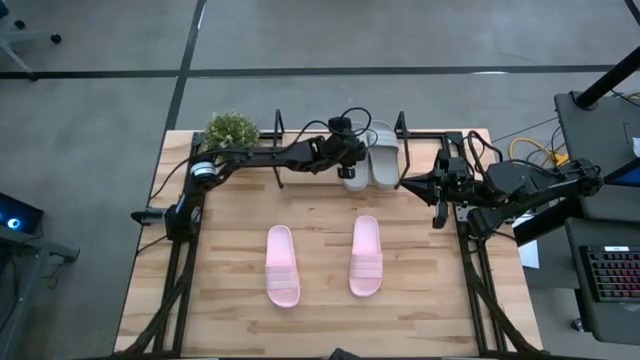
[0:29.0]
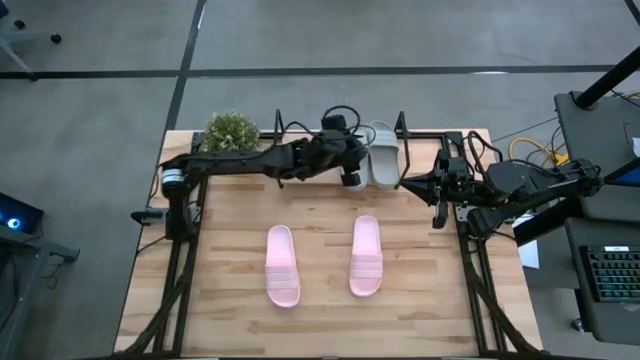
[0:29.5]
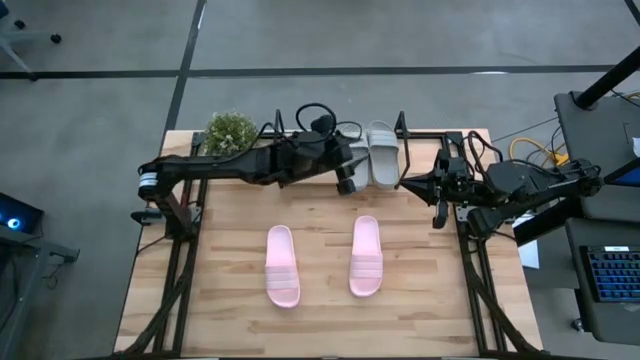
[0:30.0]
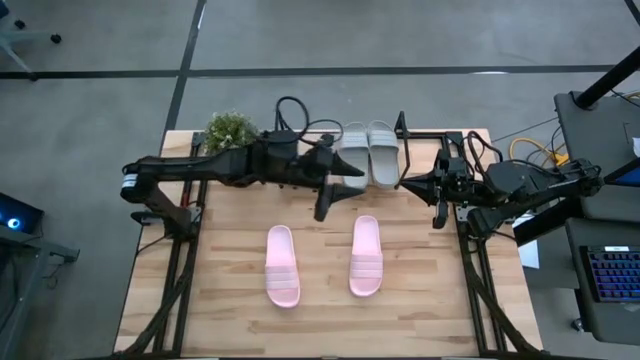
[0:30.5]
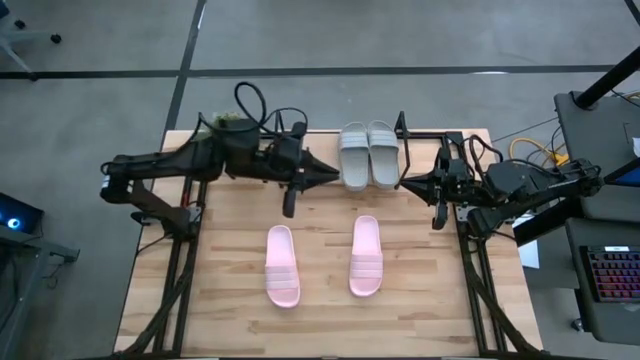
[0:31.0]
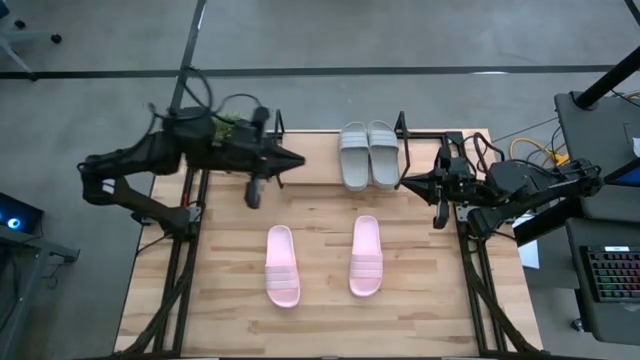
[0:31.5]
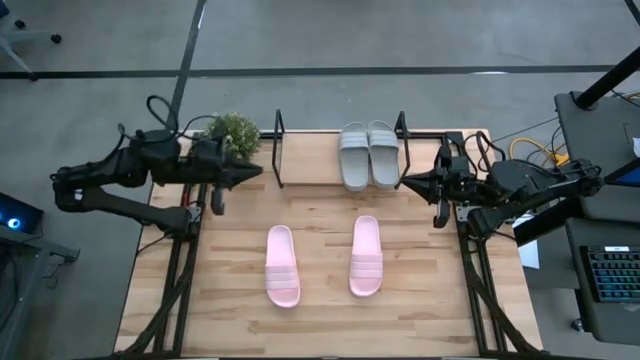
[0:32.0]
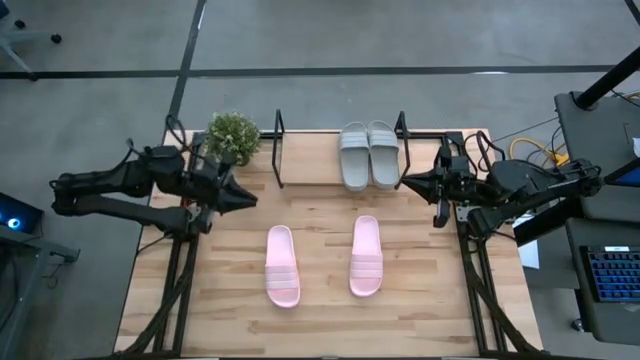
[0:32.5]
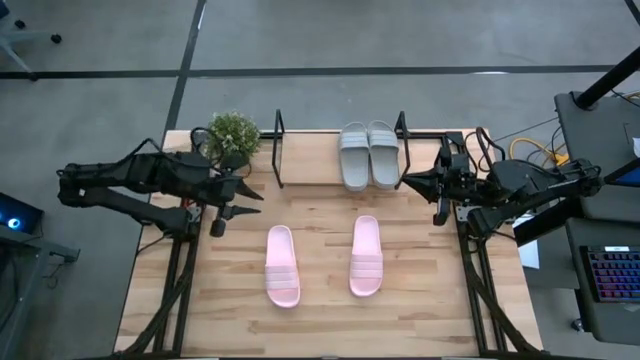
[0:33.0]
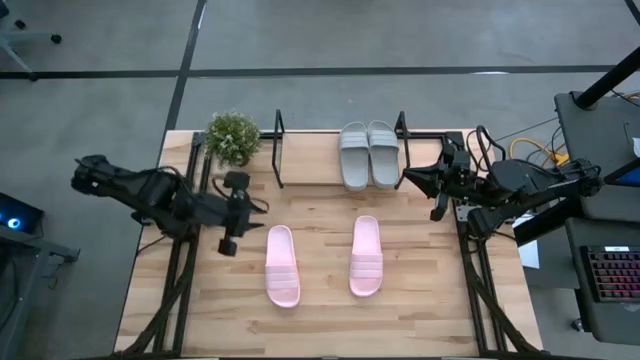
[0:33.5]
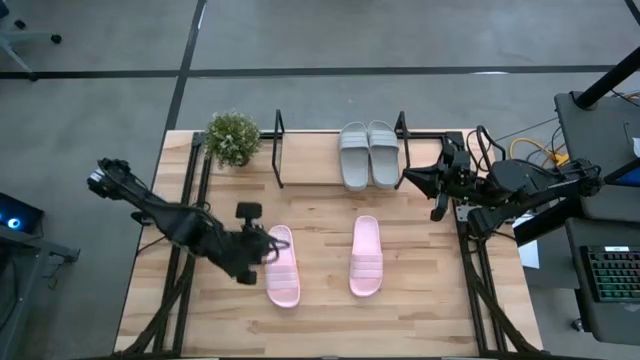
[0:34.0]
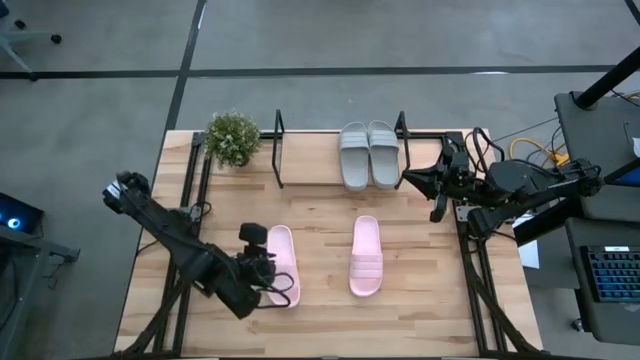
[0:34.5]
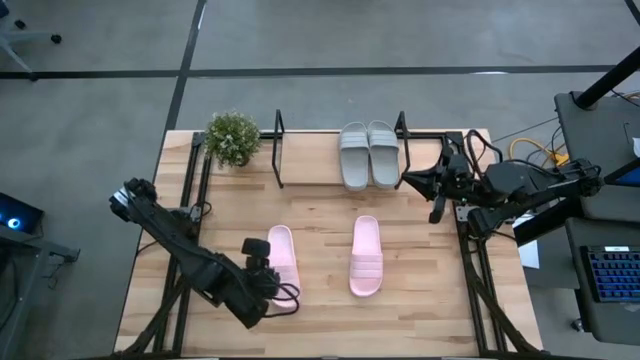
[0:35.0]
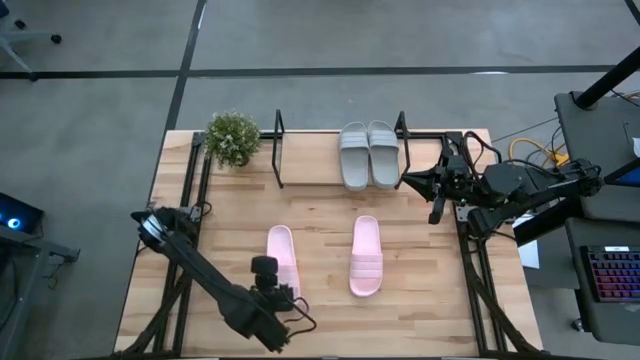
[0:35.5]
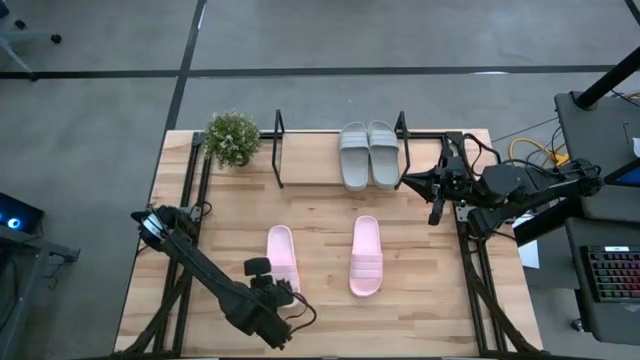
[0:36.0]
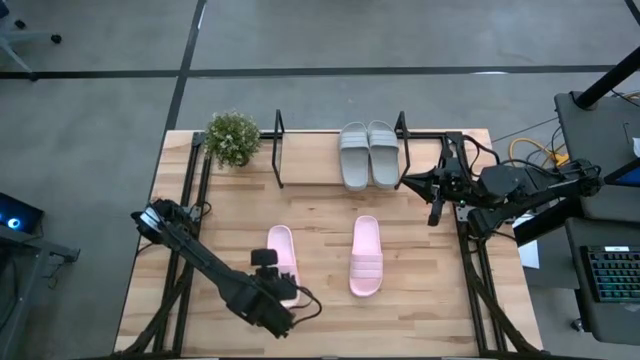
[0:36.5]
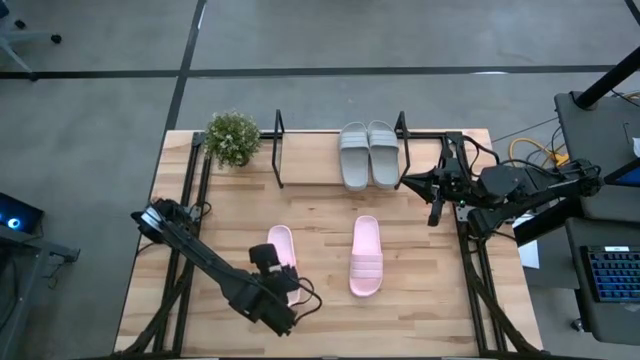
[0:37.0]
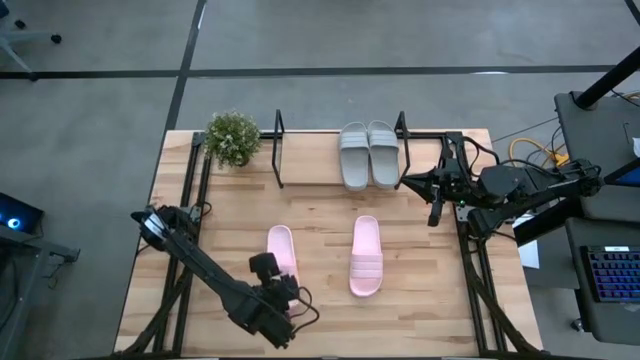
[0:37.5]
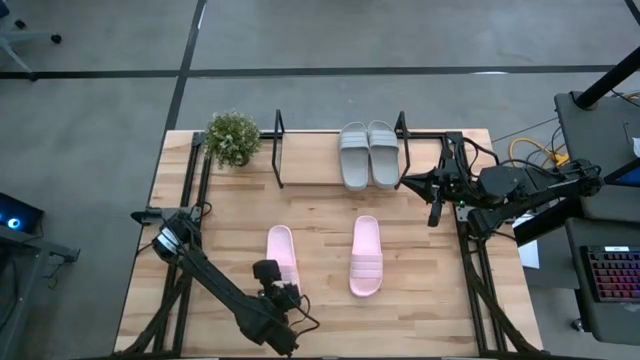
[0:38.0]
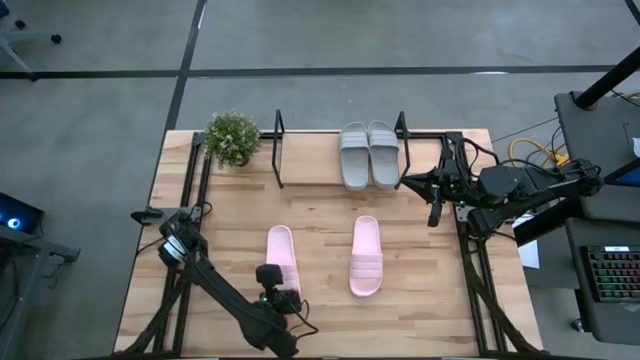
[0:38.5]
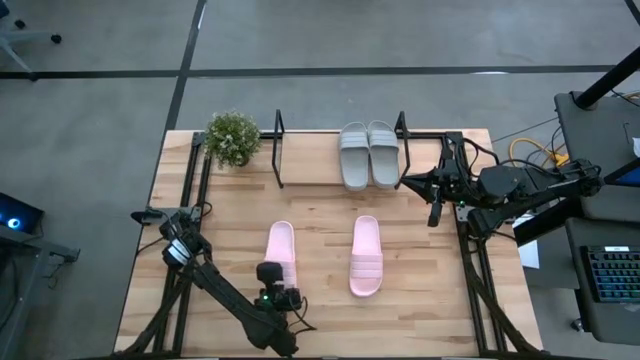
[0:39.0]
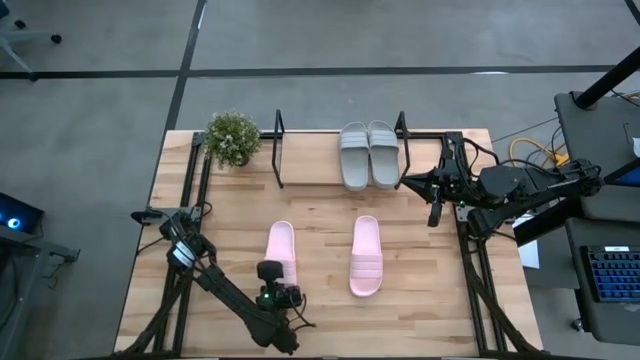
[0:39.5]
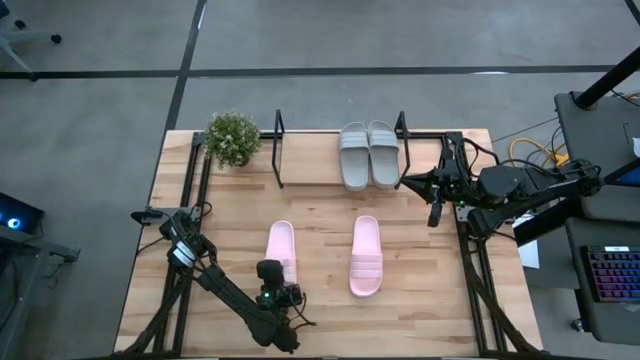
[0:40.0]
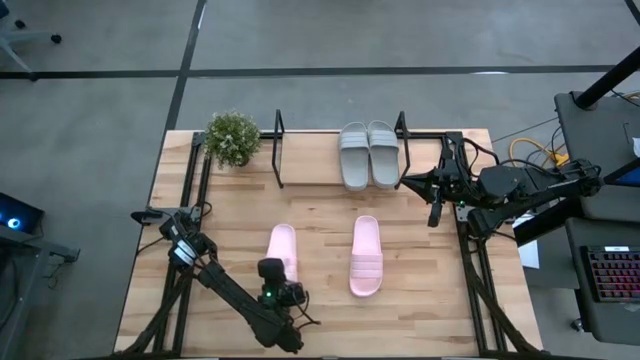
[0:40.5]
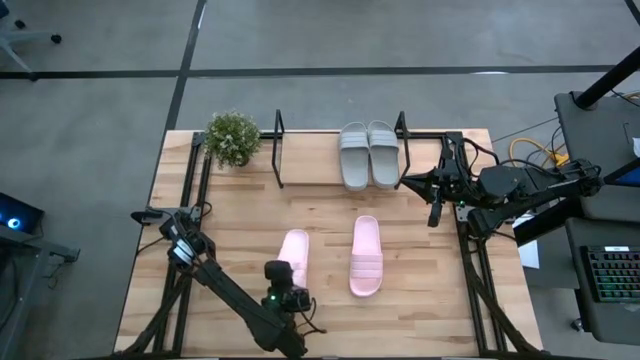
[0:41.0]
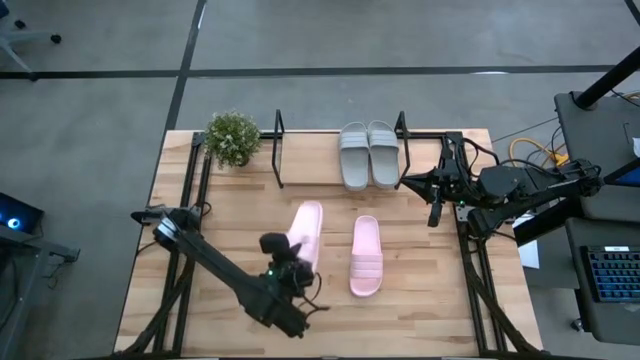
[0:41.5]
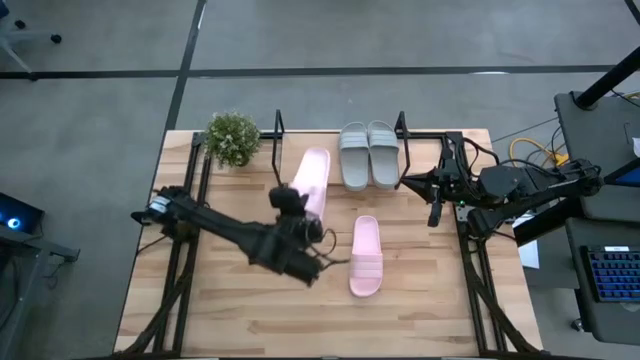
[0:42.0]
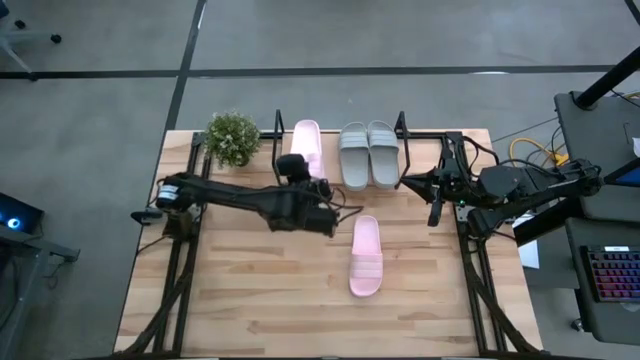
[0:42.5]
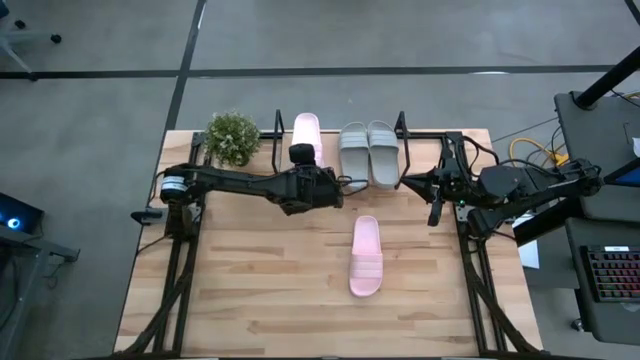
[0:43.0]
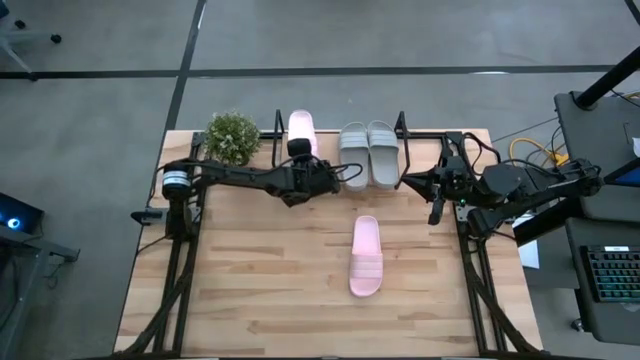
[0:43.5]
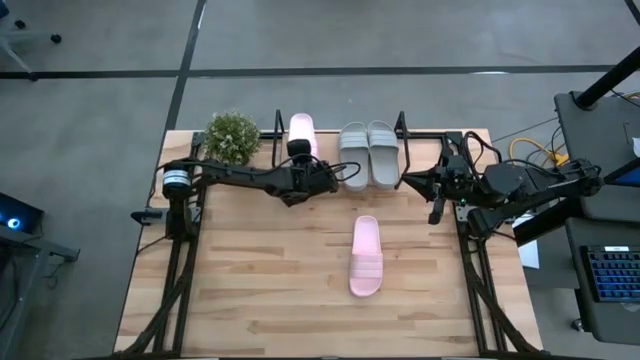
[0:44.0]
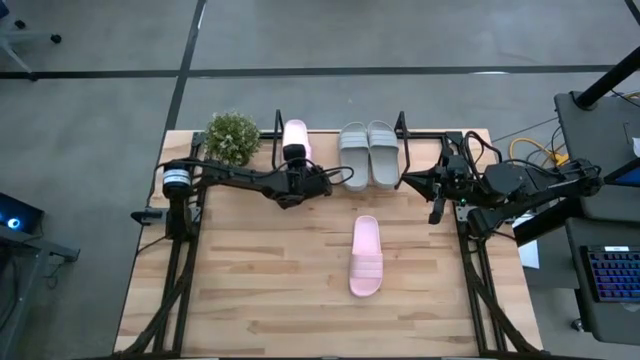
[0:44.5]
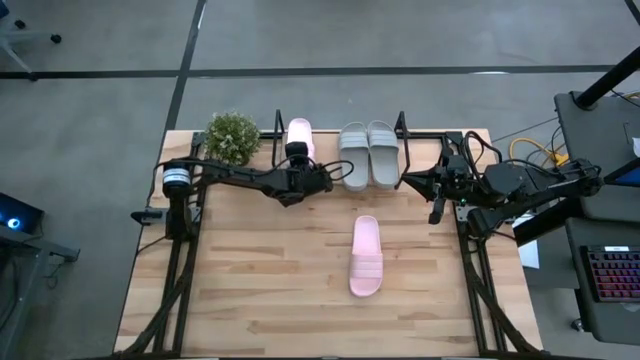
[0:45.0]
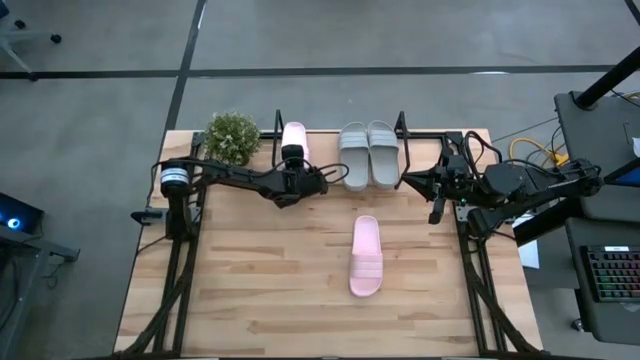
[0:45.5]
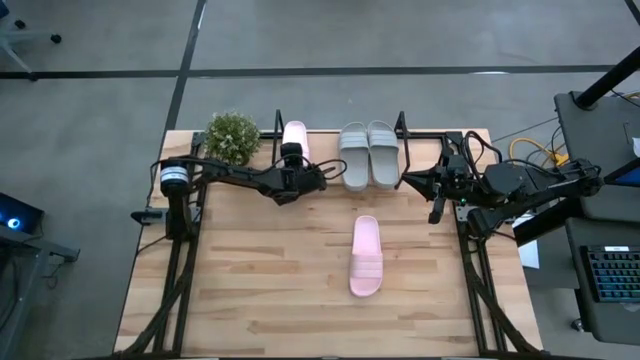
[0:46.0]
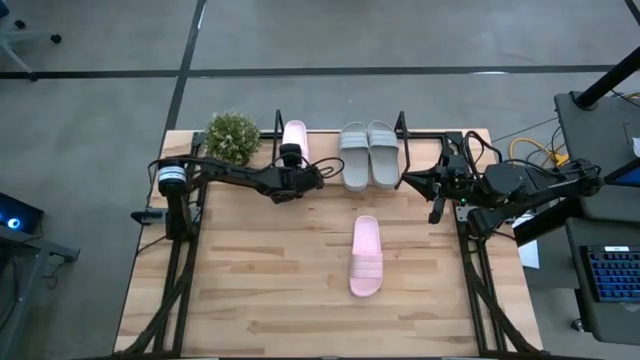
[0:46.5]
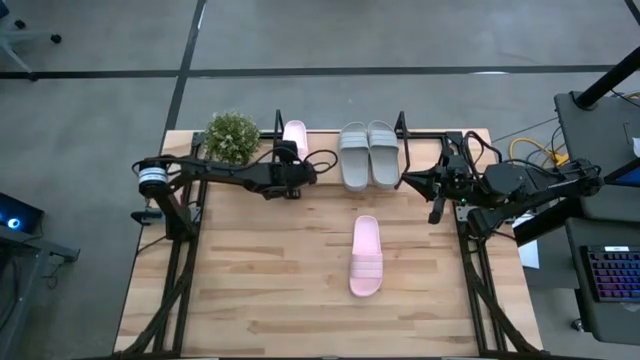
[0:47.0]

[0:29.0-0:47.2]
Task: Pick and place slides into the shelf
Put the left pink slipper on the shelf

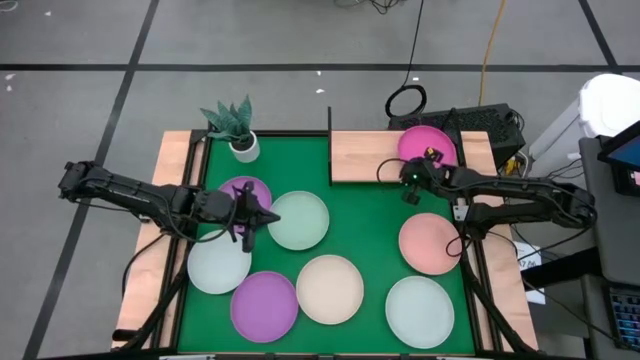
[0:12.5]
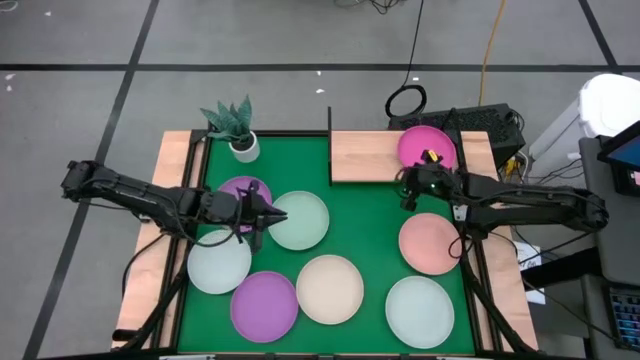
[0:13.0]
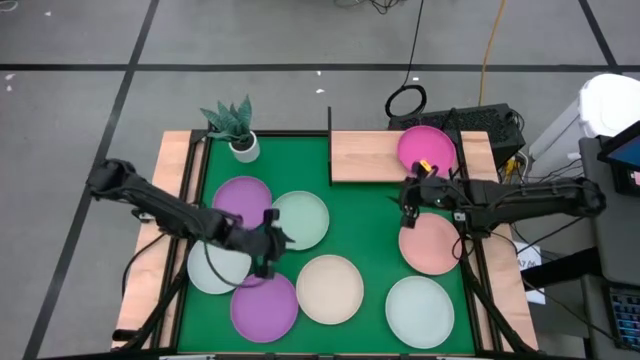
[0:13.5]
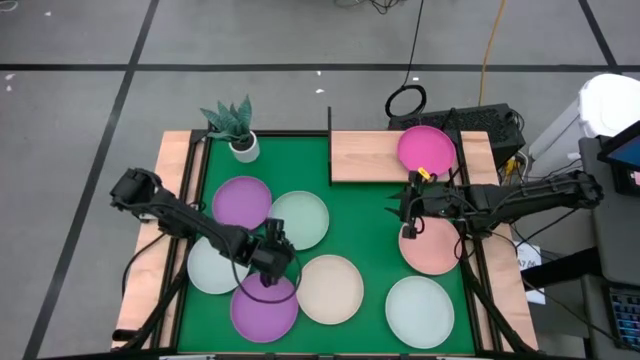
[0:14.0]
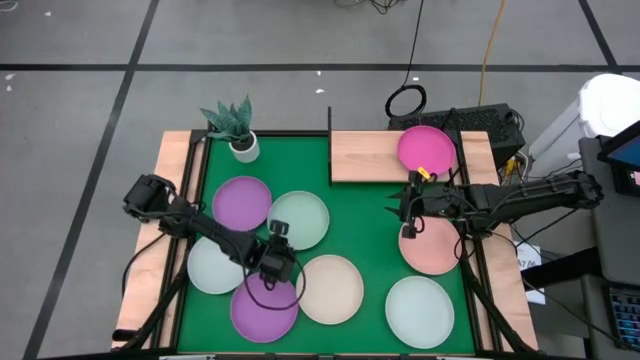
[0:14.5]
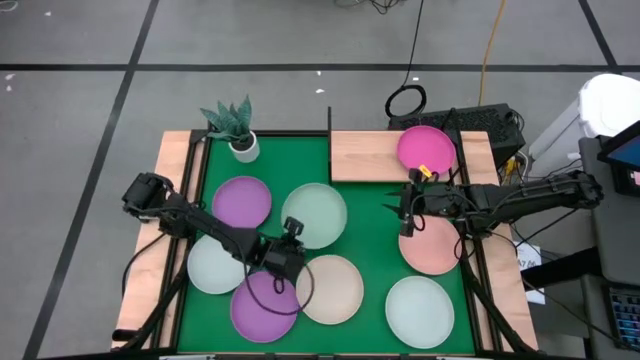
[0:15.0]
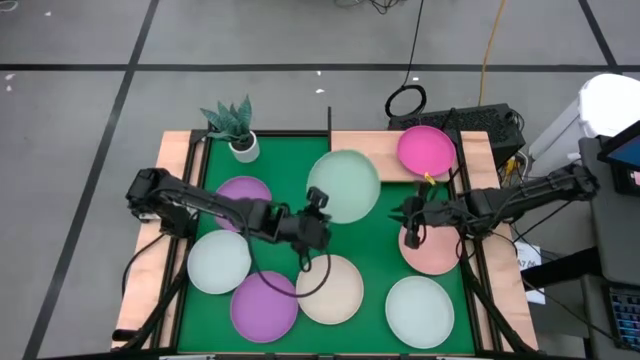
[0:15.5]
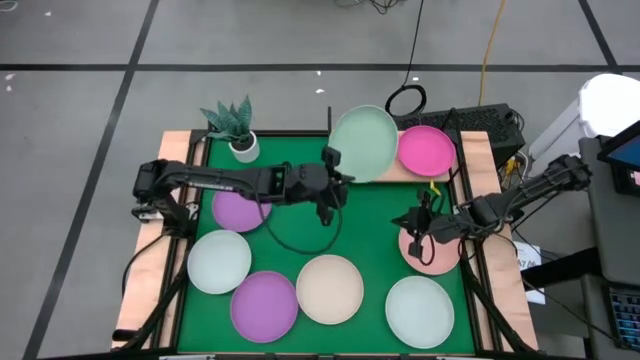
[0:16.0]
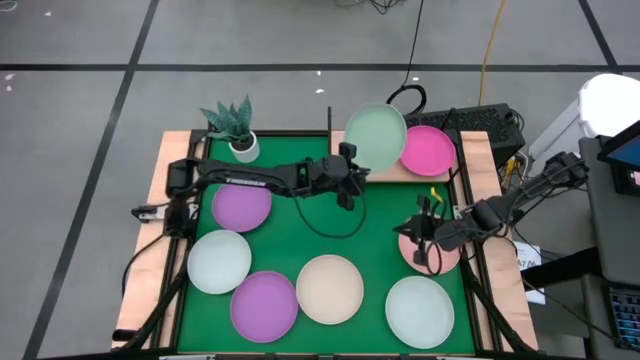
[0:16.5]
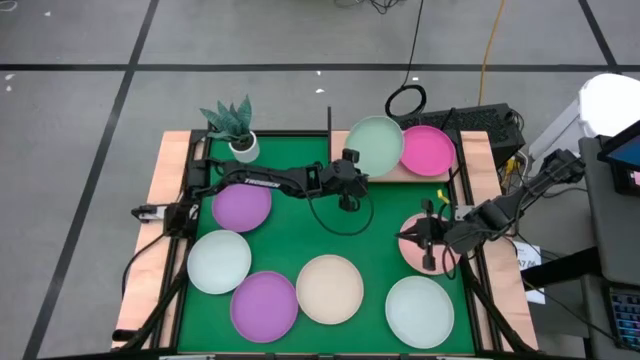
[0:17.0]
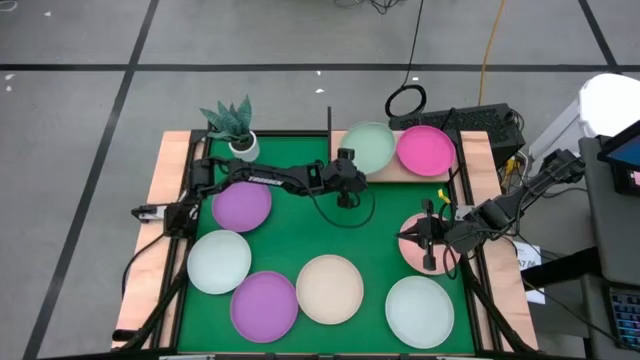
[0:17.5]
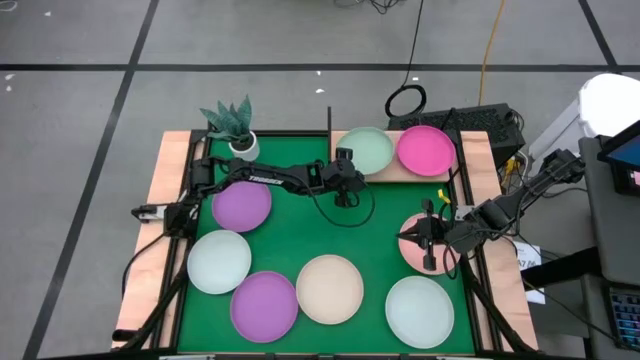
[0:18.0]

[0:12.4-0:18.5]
Task: Place and stack plates onto a shelf
Put the light green plate on the shelf
